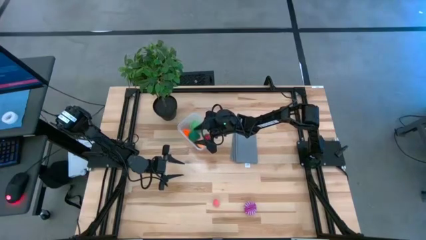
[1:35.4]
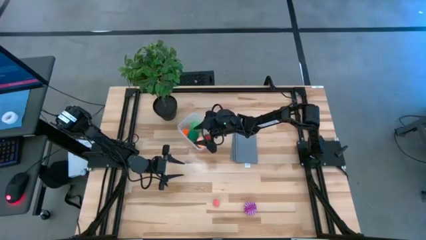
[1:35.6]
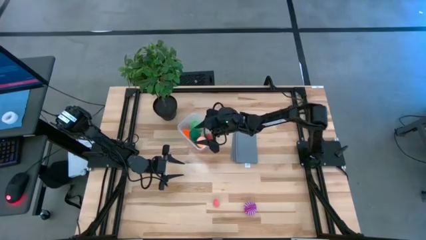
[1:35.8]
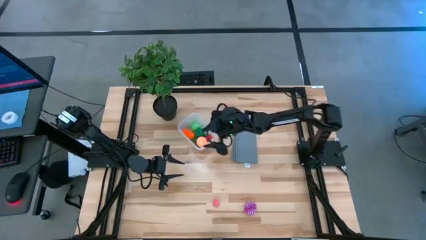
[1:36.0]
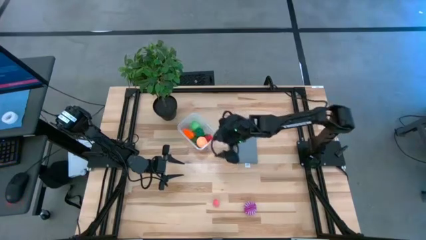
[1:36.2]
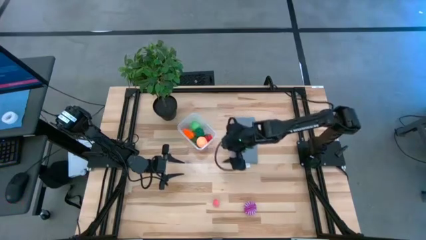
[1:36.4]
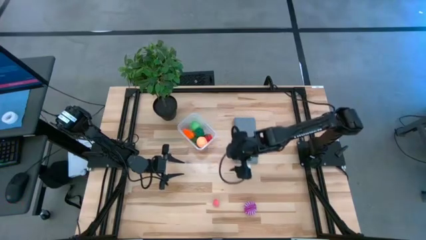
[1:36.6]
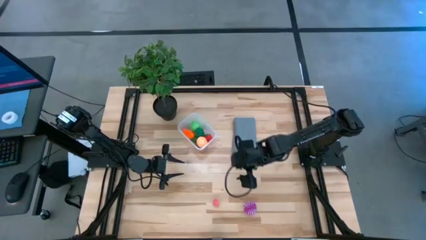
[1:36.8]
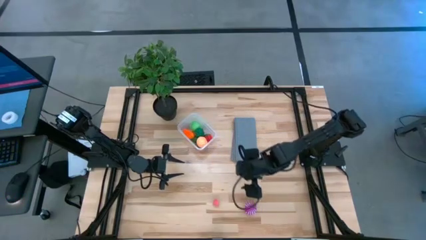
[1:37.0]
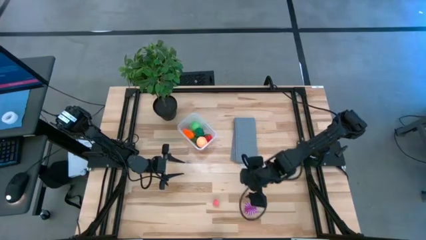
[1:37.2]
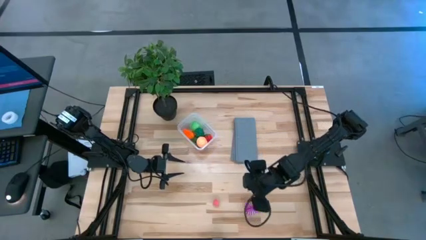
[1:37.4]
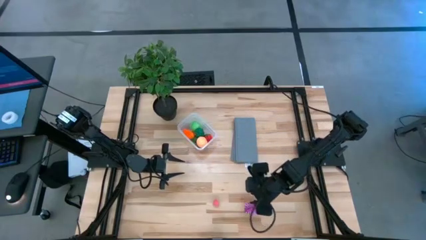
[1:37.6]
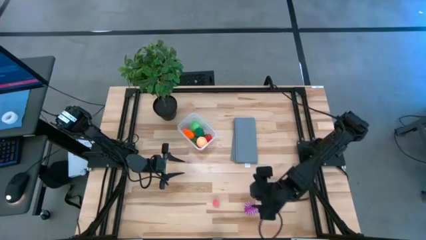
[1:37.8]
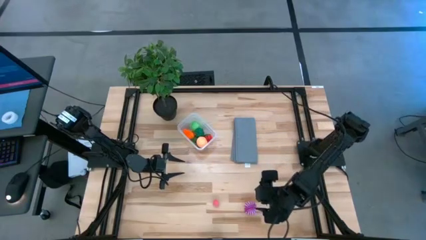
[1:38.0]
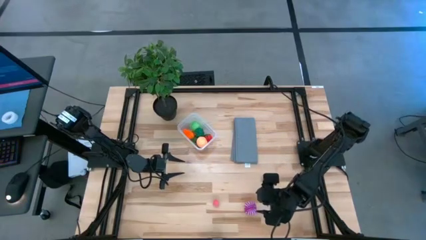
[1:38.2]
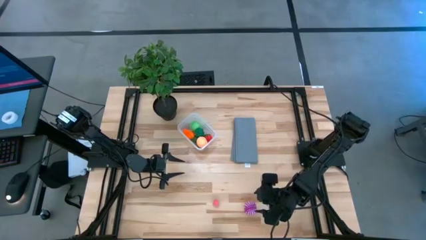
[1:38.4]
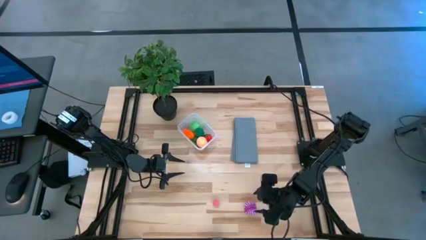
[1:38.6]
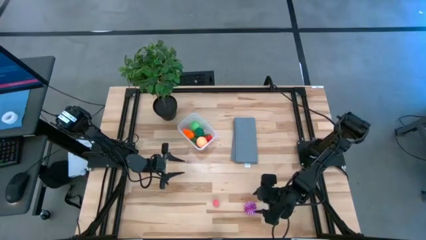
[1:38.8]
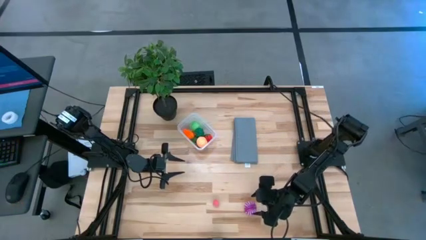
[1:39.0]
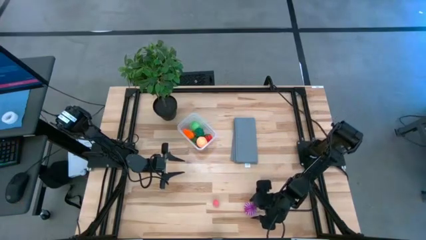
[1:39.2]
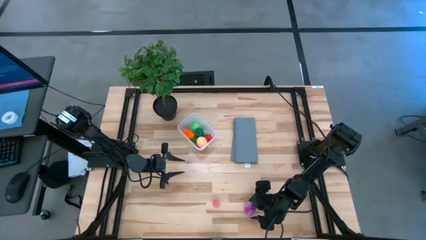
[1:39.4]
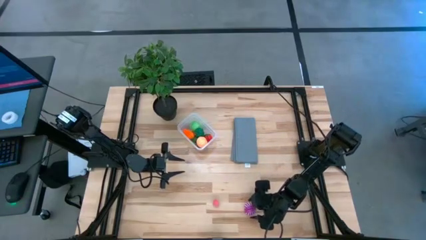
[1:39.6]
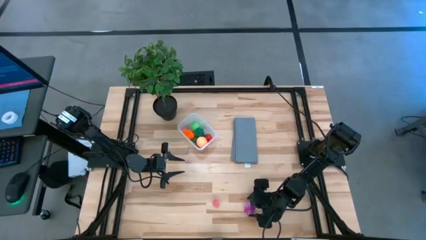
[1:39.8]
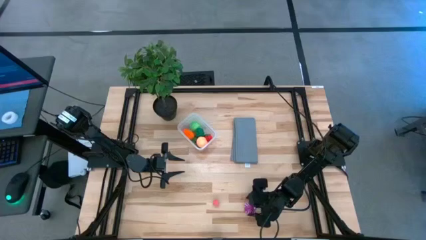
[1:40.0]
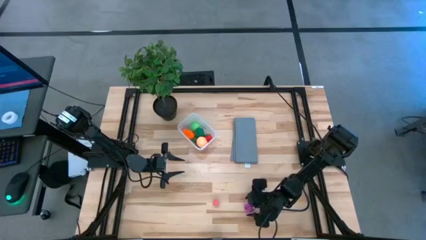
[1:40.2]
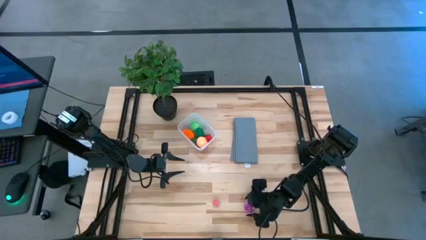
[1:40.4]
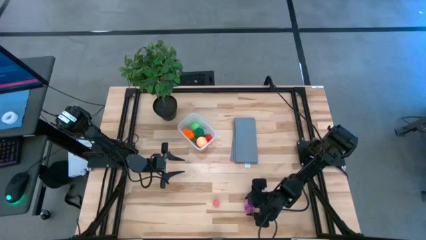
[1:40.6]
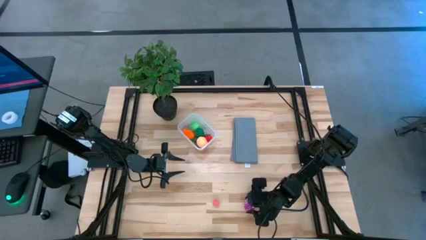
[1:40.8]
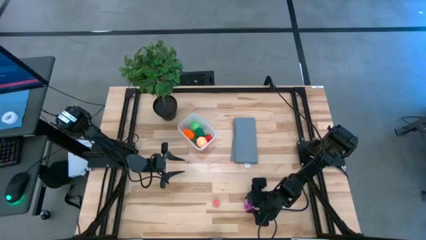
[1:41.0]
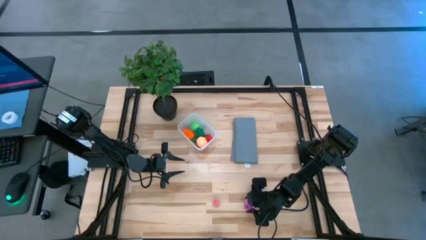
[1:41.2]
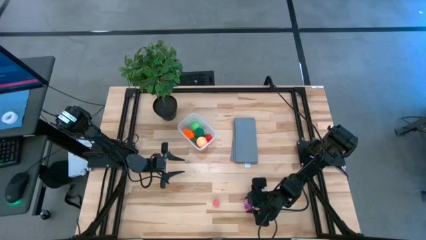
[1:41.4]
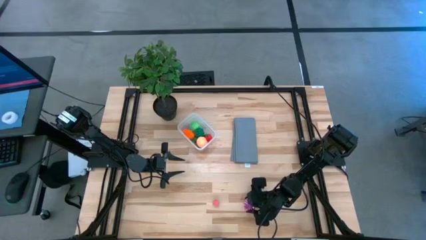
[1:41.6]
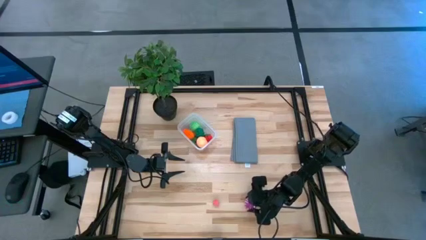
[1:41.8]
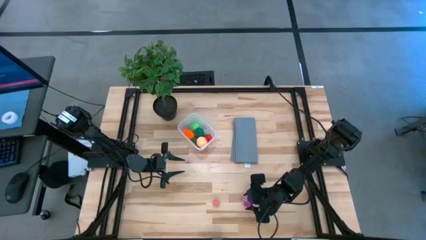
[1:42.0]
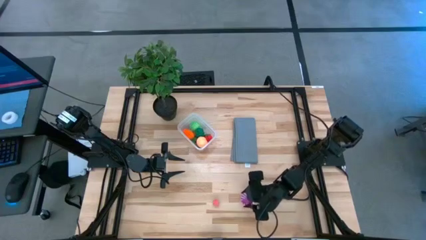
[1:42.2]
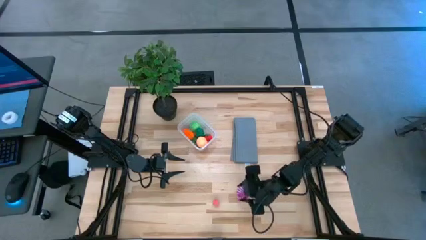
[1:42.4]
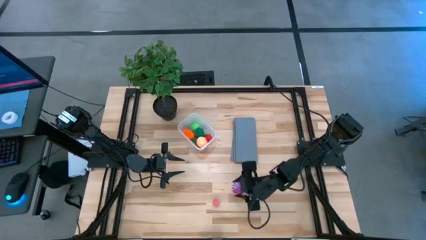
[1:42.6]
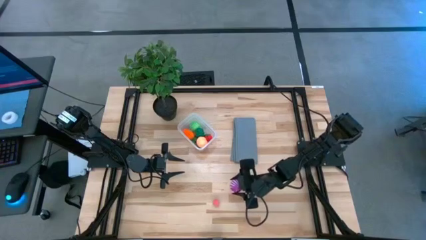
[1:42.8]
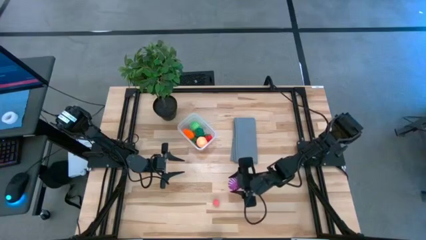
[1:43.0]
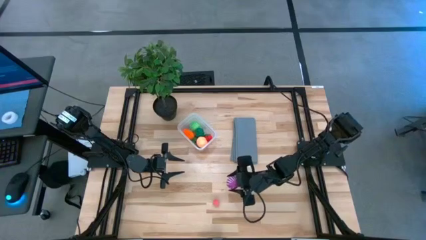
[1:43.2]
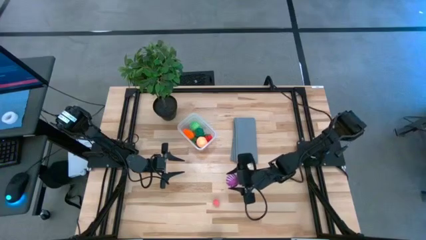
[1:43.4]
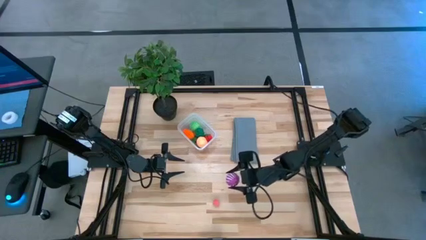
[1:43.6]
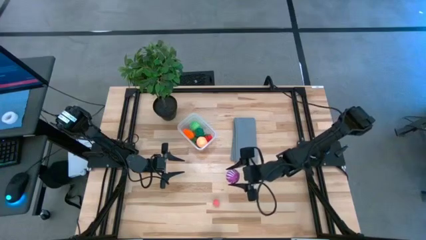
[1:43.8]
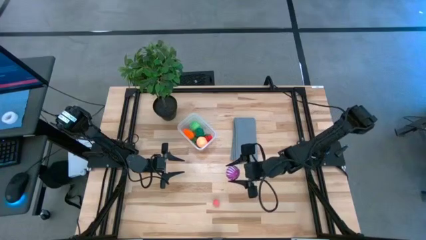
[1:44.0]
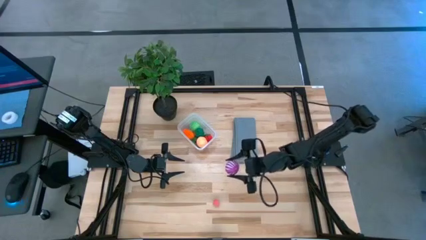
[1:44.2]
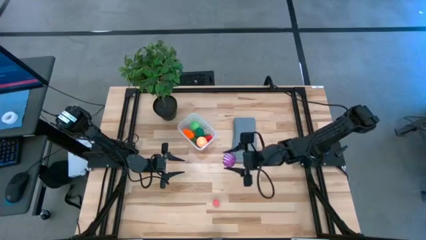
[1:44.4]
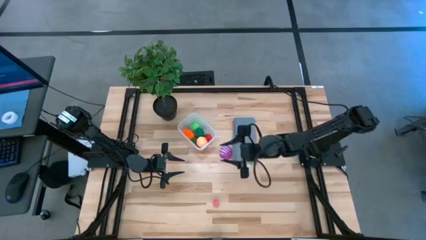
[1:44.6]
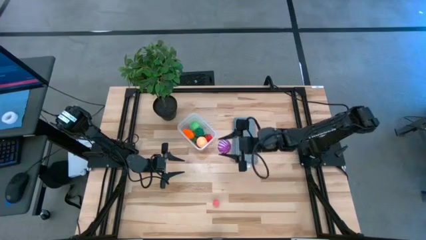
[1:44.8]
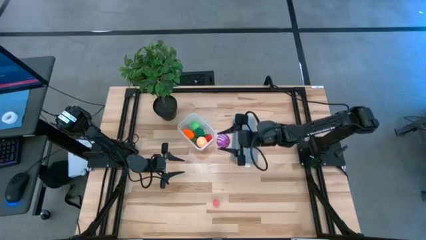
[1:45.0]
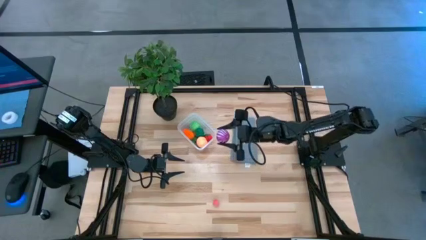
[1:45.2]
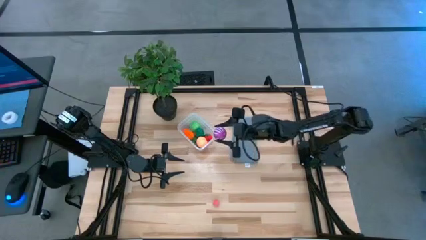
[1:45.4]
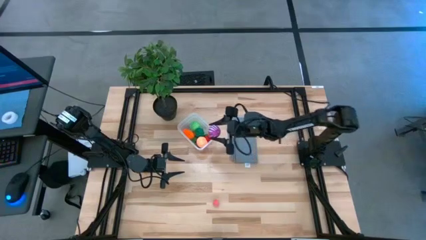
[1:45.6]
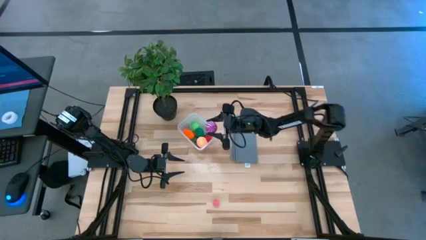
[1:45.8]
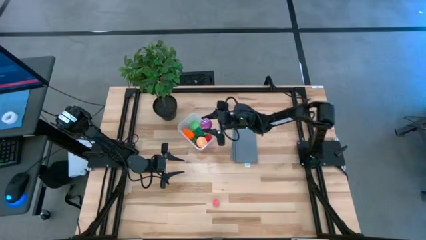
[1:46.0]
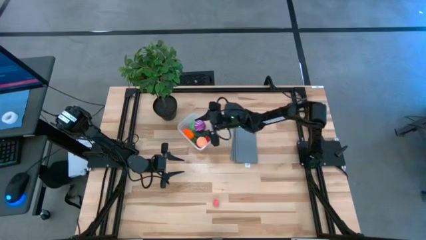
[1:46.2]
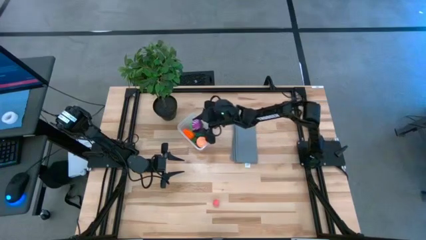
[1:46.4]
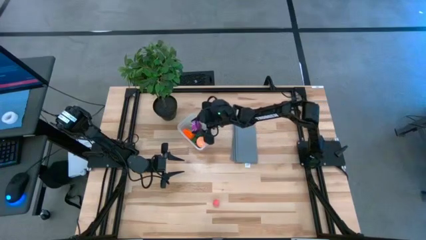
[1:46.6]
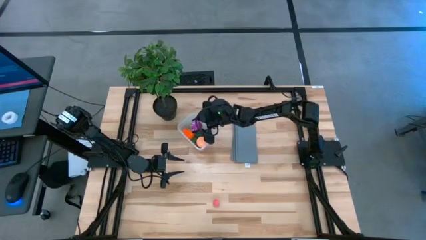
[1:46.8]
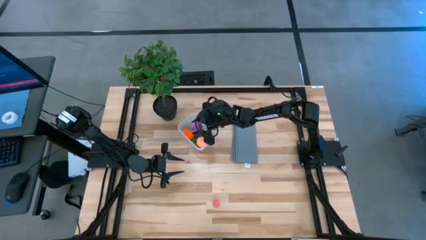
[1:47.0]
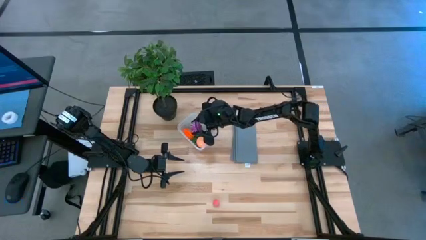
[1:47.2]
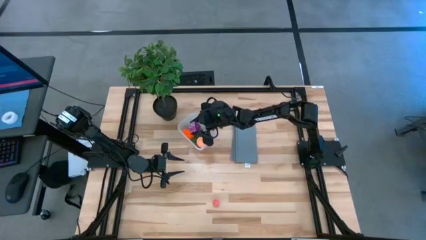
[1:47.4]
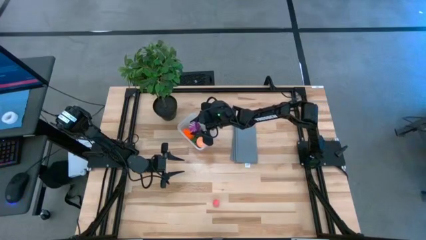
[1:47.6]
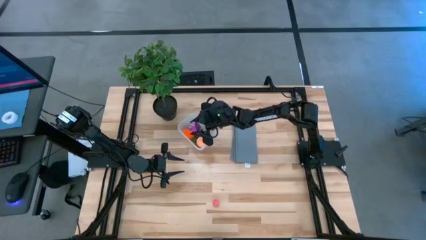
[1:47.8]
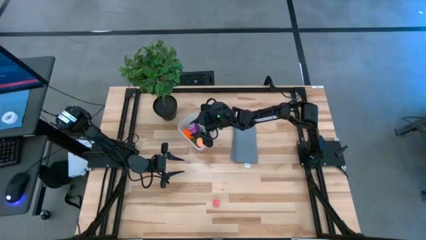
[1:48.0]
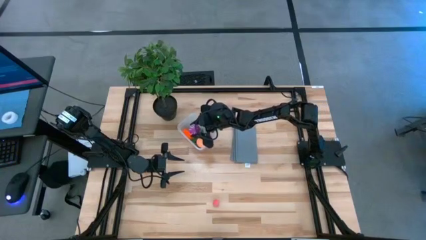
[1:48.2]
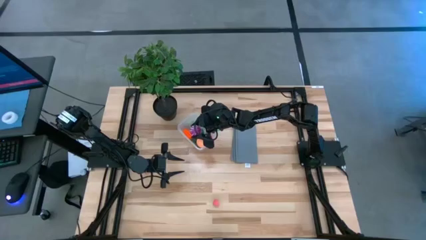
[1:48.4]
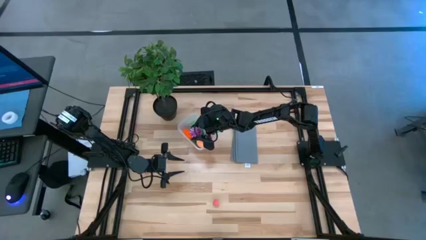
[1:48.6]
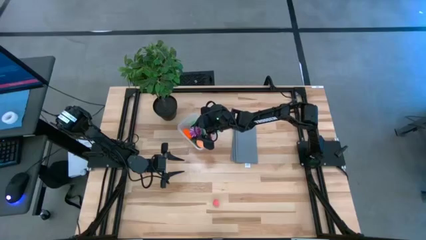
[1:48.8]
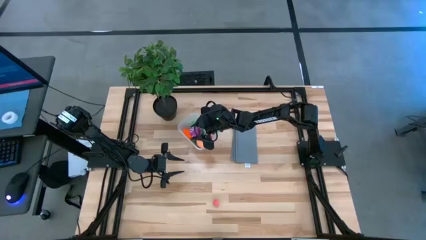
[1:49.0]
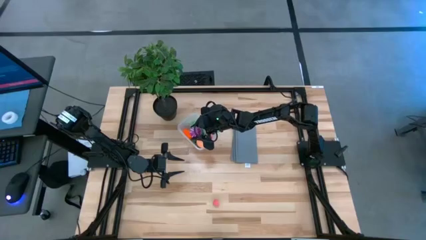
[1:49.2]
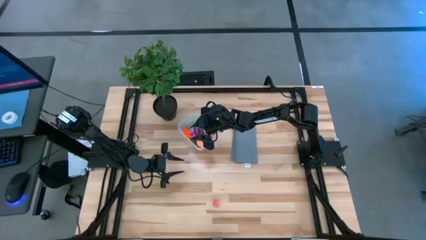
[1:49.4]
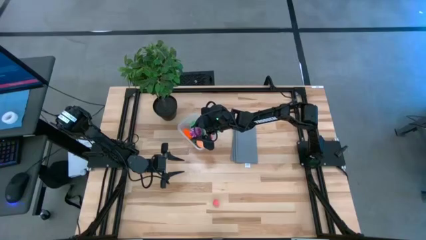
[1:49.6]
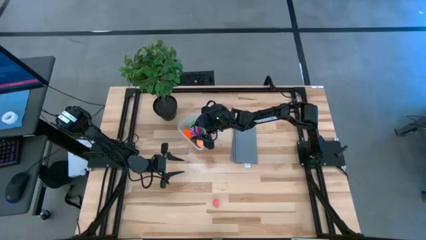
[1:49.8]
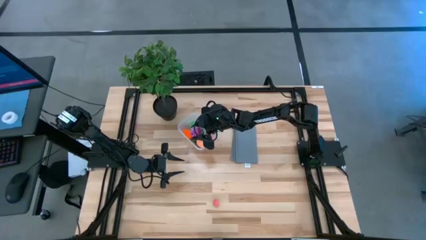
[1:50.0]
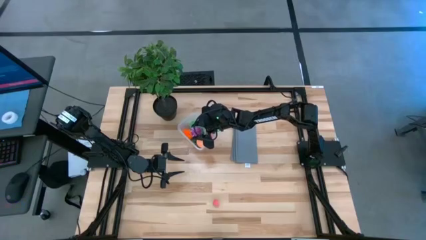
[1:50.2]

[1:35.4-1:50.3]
Task: Pick and placing Produce into tupperware
Put the purple onion into the transparent bin

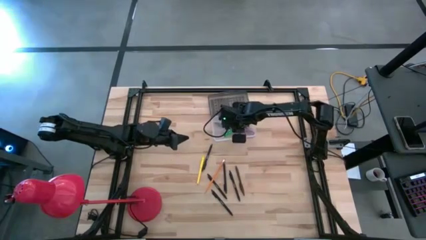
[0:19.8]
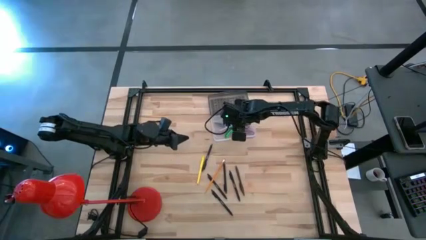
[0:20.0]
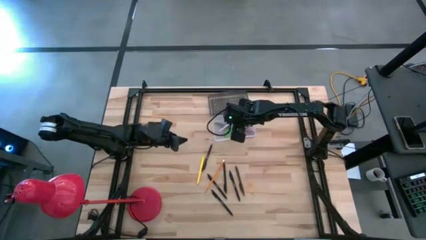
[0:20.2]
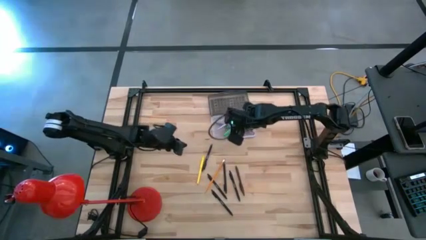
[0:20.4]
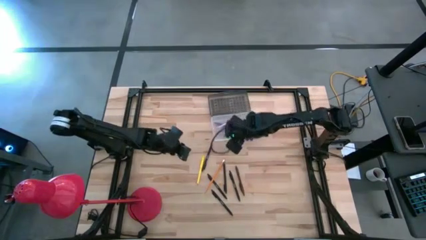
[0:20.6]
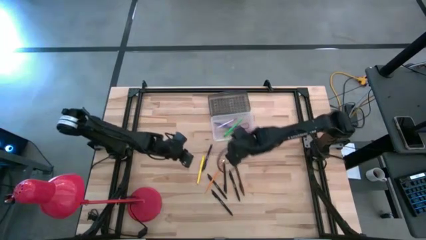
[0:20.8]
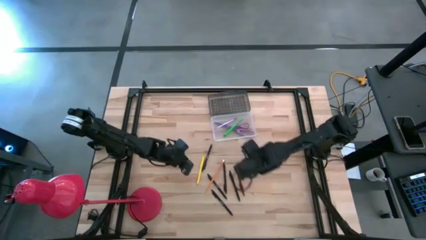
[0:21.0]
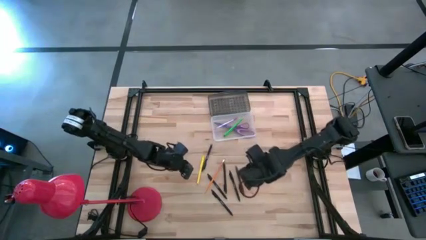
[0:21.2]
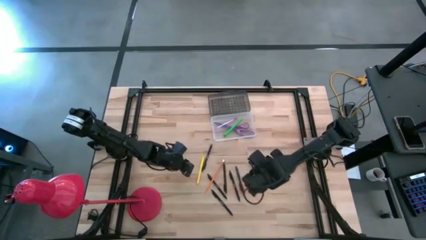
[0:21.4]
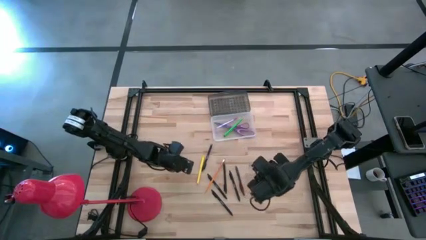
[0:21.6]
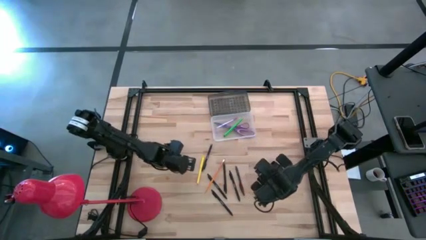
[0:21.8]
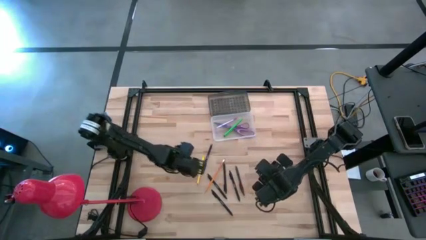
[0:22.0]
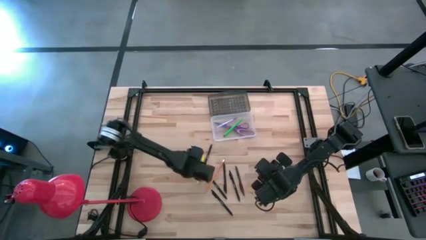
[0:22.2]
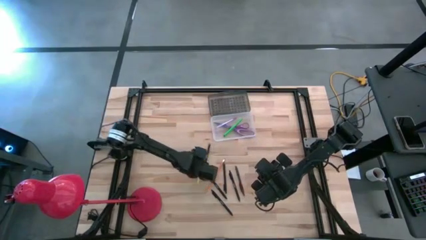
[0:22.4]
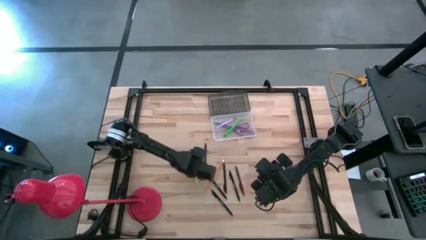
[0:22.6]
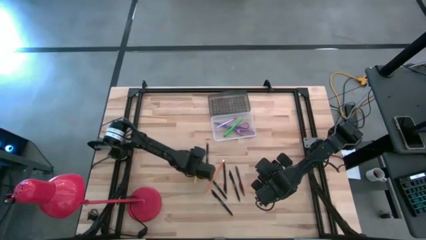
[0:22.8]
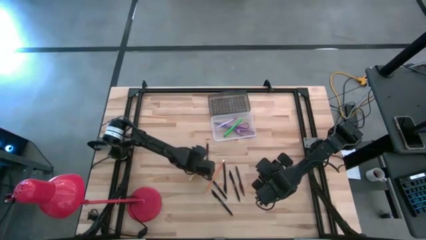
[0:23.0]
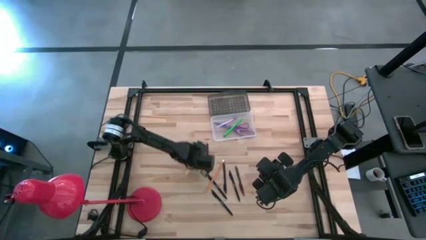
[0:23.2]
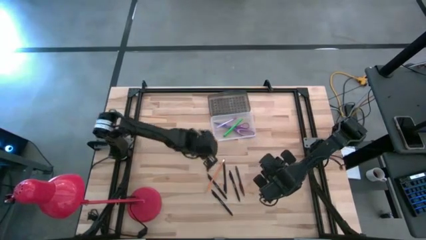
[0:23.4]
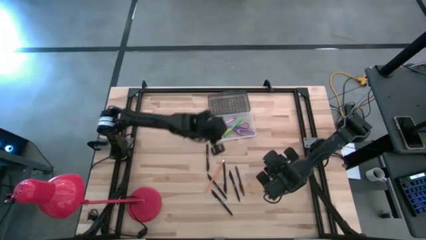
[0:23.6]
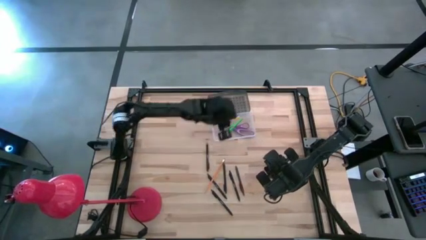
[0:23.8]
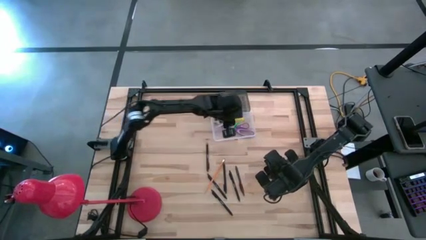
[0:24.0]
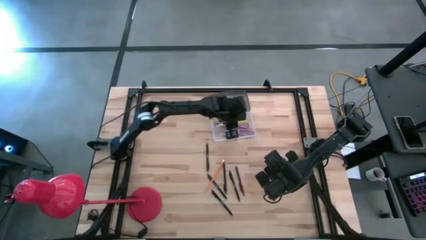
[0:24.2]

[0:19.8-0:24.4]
Task: Pick & place school supplies into a supply box
Put the yellow ballpen into the gray supply box
